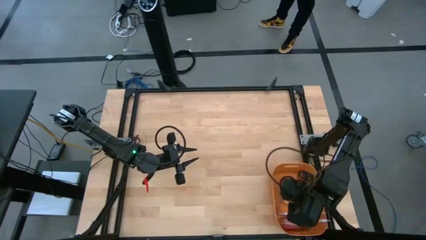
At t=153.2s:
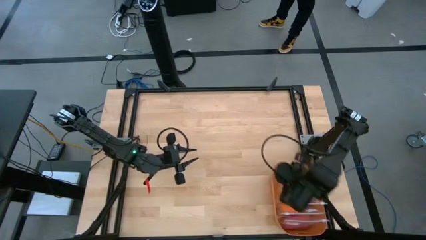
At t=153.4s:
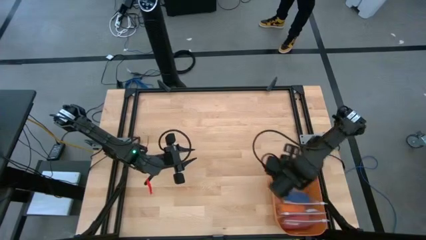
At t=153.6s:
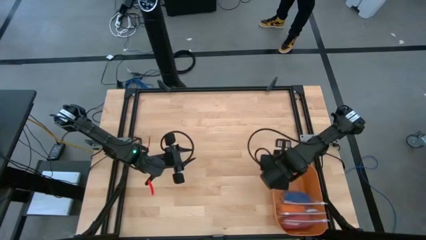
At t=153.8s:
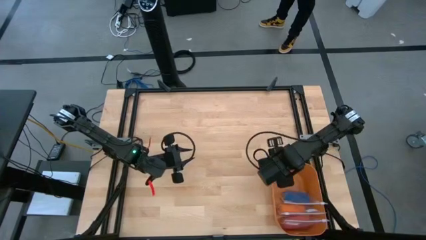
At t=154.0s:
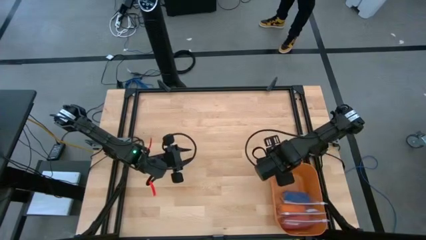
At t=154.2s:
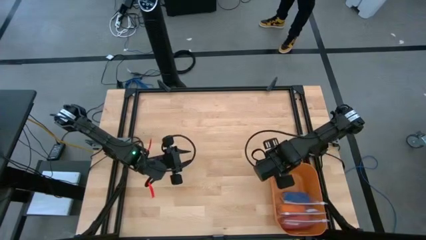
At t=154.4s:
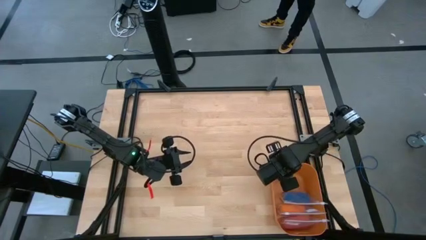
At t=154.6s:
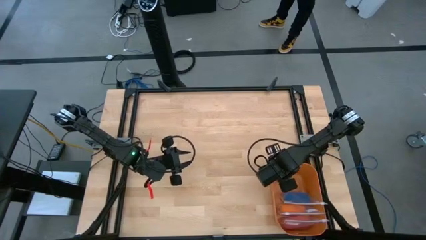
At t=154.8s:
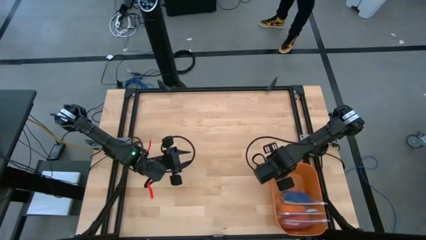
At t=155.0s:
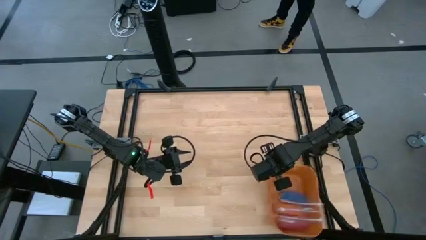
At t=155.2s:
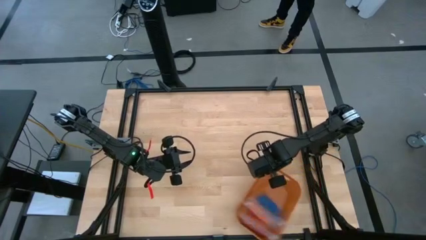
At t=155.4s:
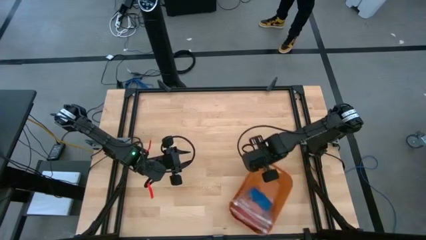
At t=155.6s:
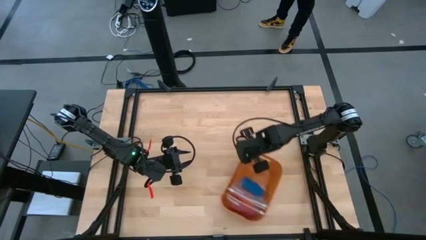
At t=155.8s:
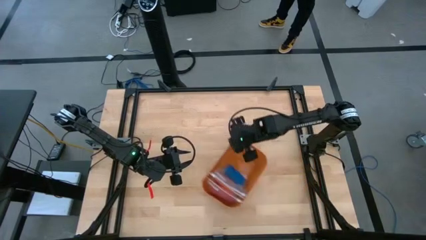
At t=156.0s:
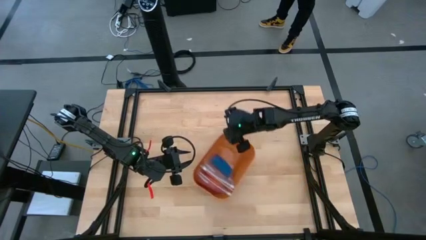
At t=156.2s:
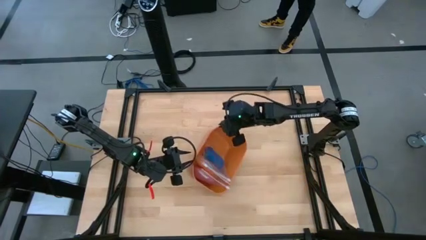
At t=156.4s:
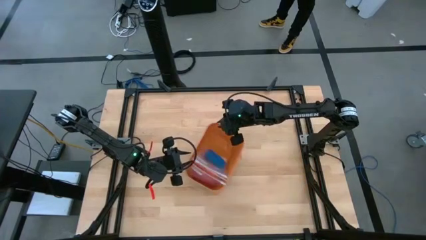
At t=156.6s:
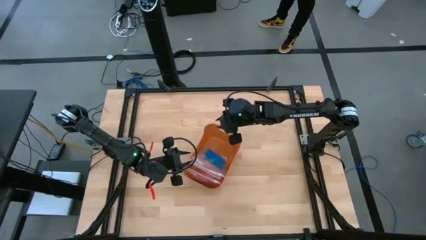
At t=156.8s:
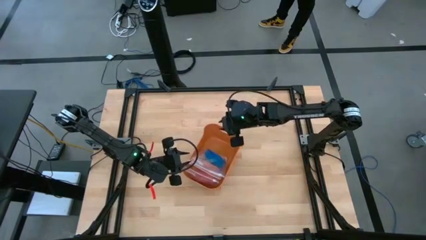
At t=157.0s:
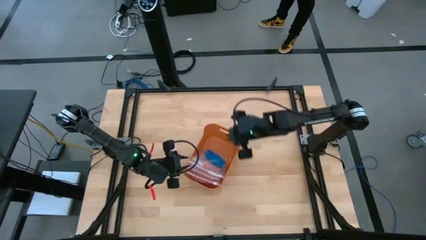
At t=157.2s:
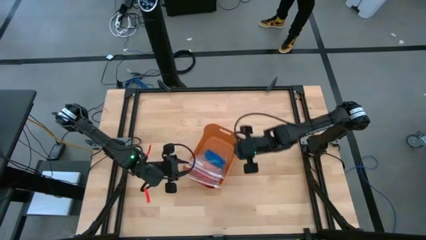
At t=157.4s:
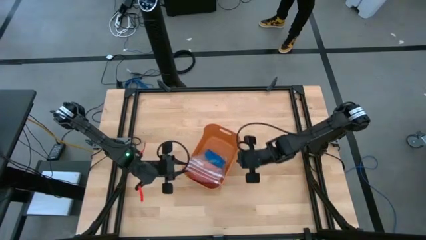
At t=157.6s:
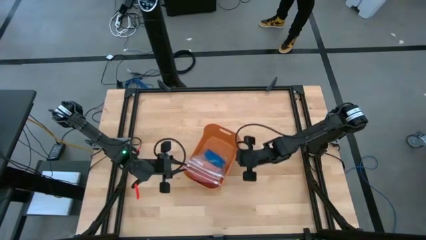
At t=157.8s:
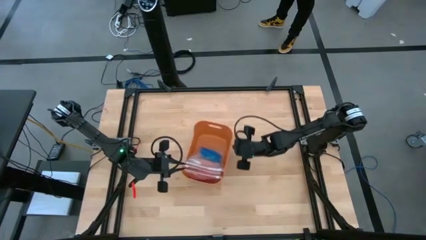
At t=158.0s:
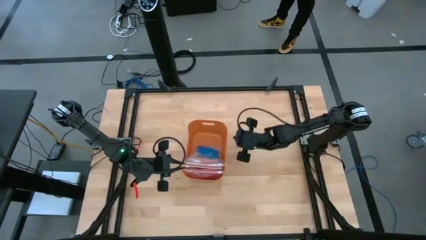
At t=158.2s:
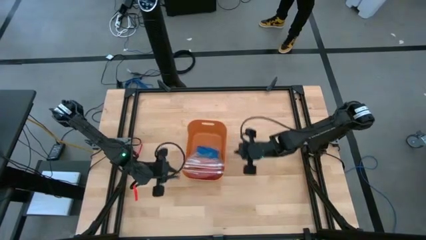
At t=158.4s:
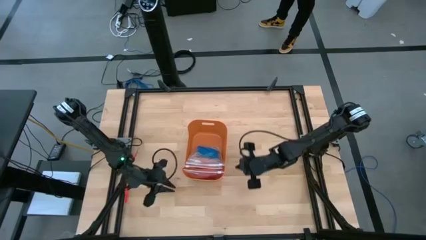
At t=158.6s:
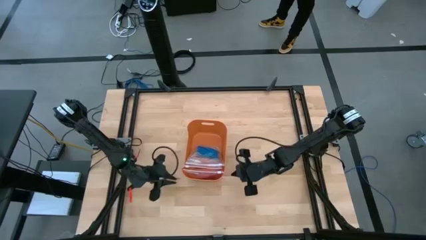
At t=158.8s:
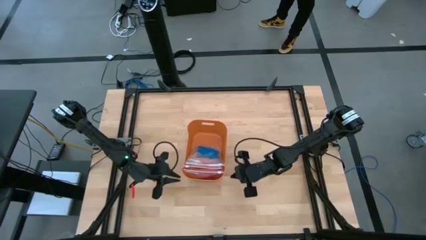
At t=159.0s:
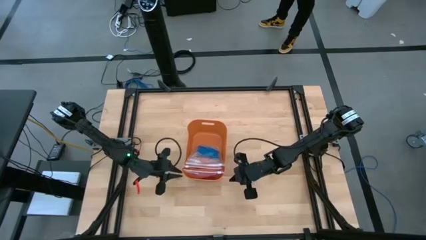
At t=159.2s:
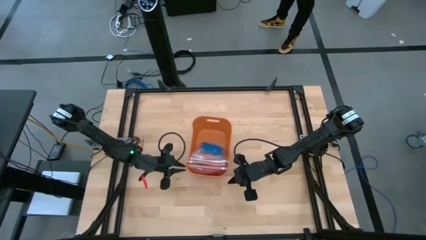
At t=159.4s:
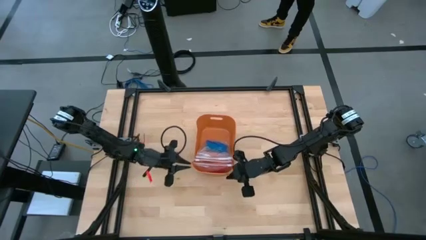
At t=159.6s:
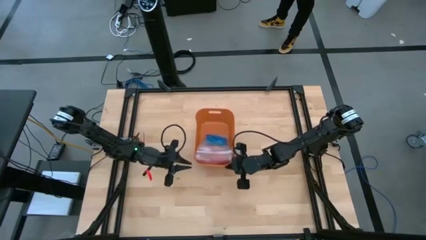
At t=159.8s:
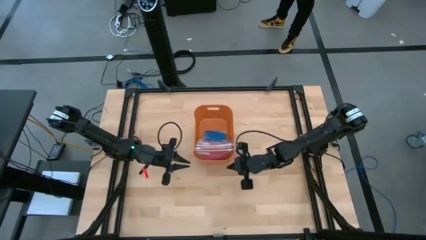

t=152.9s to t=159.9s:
Task: Roll bandage
Move the orange bin from the bottom right to the center of the table

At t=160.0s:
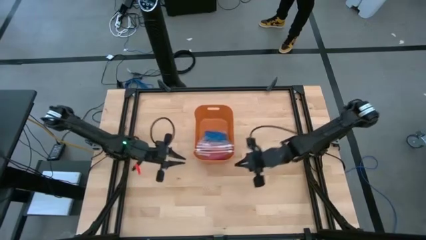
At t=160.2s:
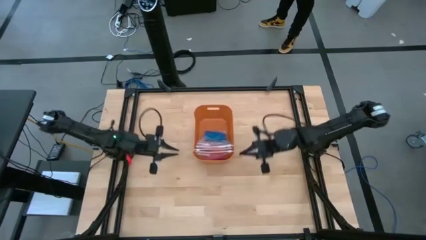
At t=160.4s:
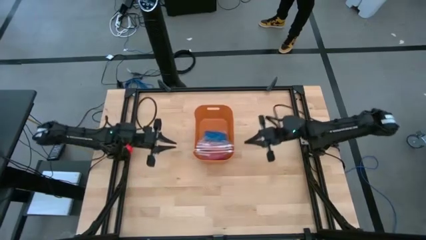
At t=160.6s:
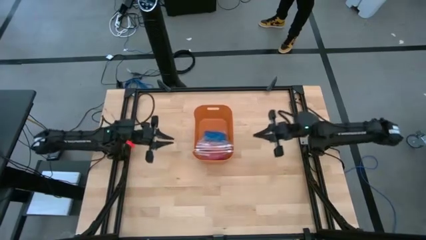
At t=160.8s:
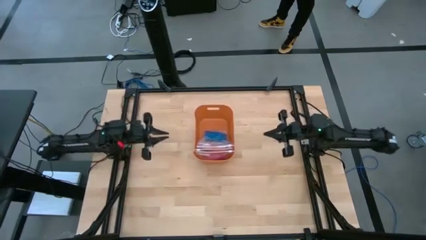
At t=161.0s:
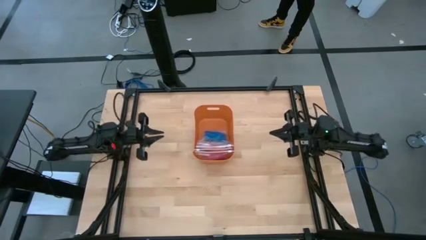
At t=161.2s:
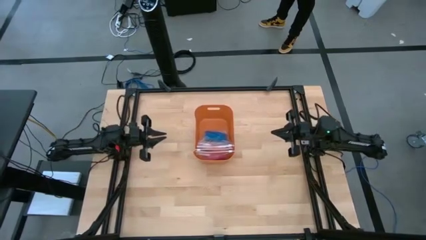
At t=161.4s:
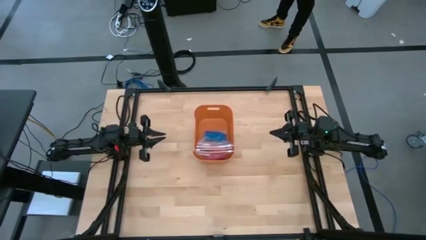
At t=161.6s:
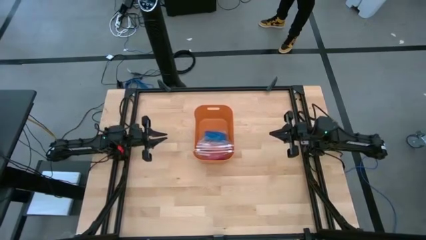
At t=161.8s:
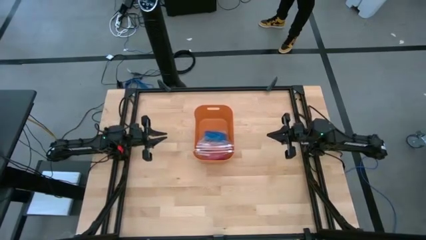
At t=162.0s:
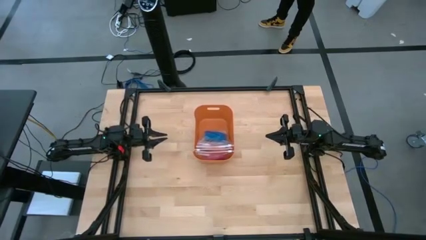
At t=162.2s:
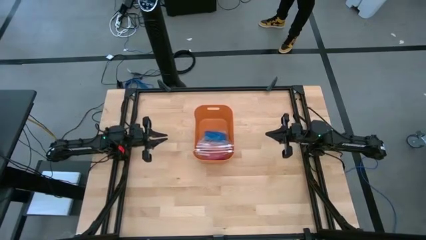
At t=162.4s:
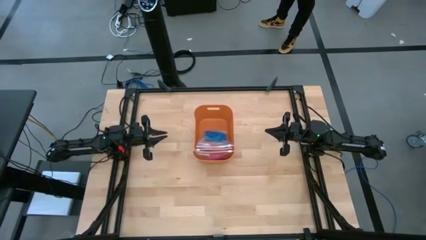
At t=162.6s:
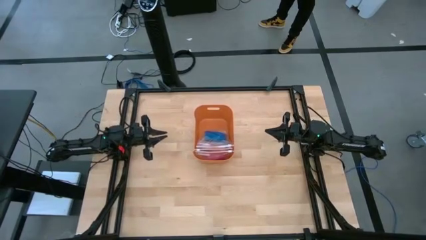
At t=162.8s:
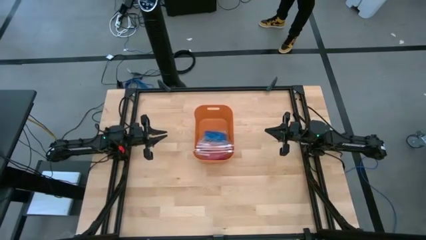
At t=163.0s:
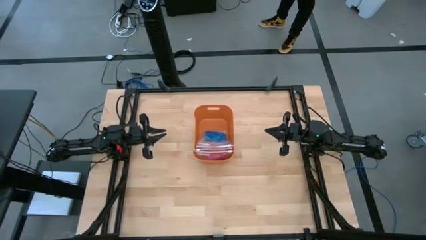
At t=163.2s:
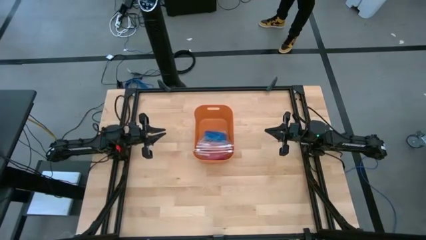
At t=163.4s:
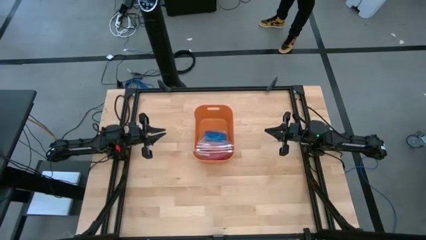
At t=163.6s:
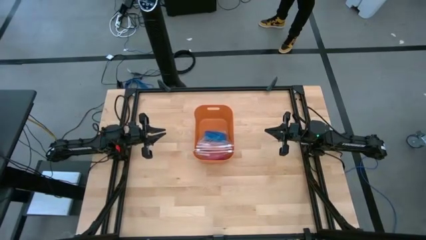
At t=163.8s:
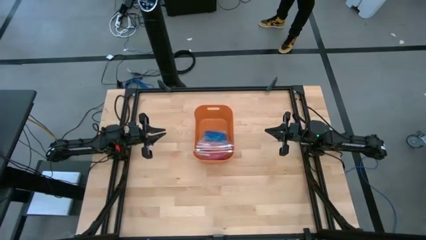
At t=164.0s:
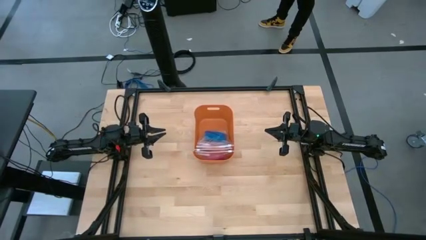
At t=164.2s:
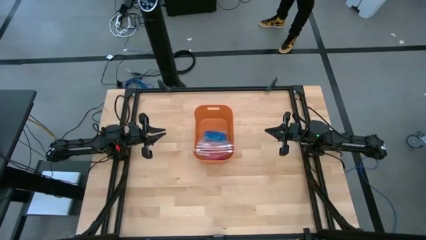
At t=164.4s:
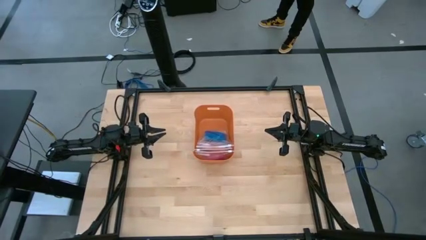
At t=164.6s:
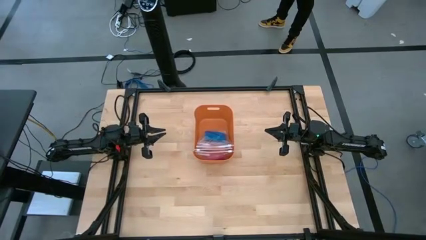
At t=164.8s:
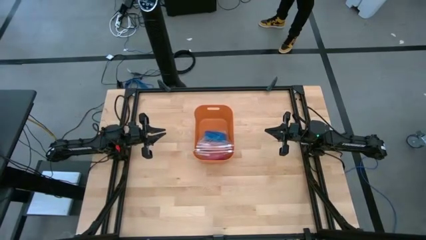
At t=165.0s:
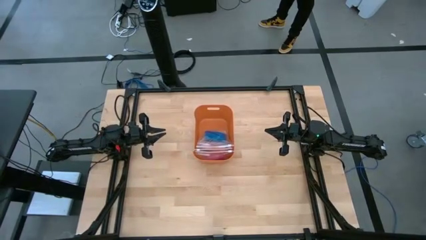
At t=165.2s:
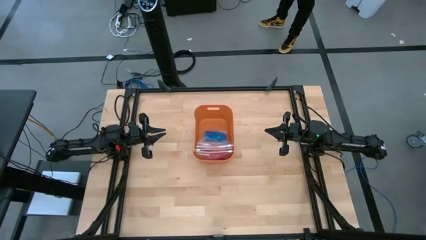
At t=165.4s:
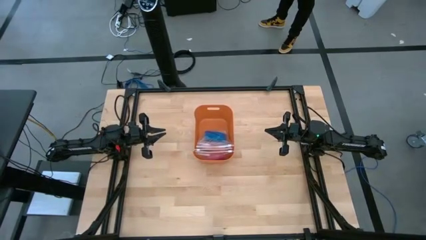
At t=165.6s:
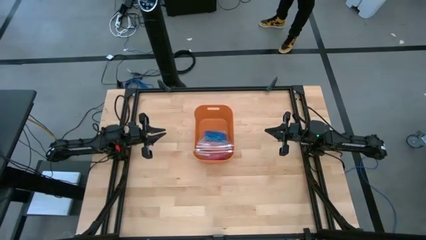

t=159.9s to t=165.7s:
Return to Home Position

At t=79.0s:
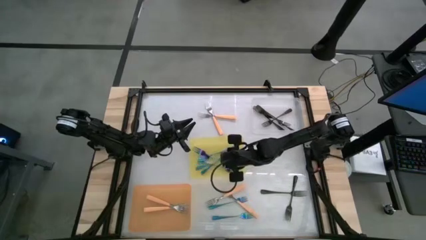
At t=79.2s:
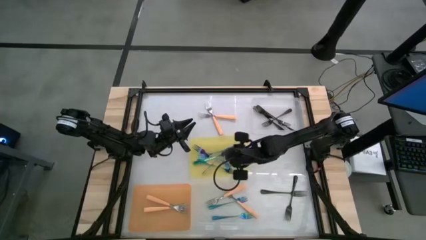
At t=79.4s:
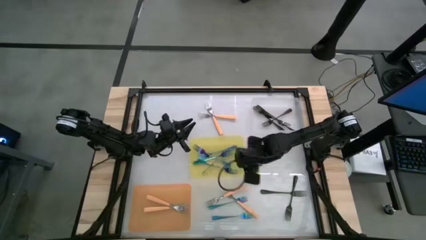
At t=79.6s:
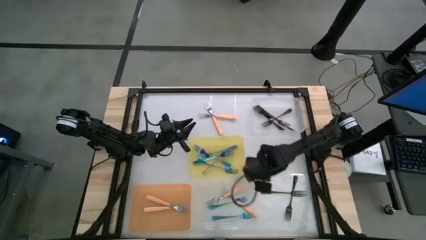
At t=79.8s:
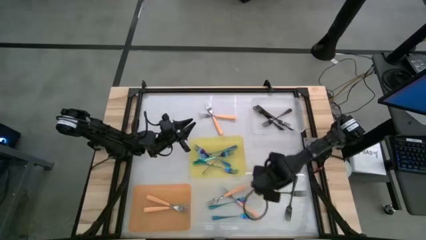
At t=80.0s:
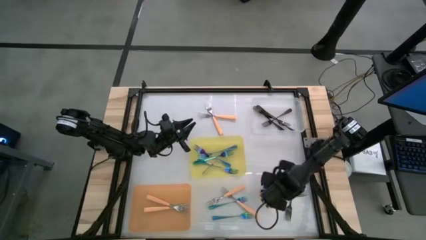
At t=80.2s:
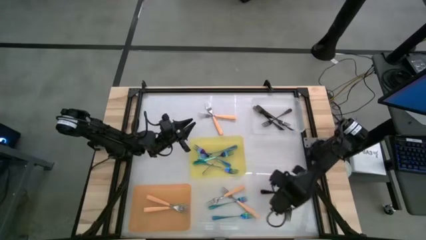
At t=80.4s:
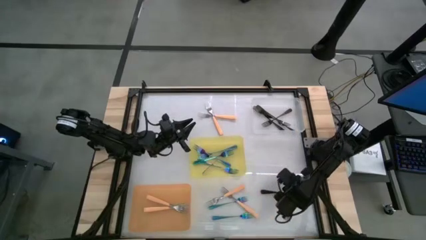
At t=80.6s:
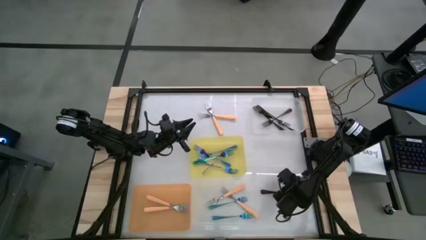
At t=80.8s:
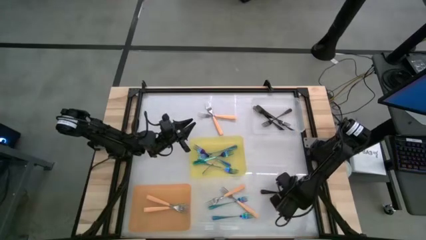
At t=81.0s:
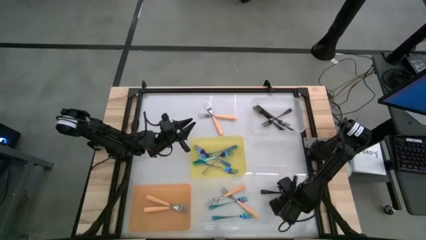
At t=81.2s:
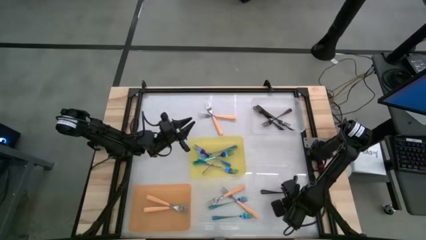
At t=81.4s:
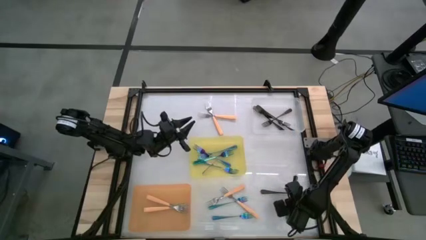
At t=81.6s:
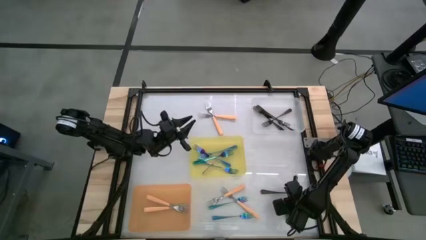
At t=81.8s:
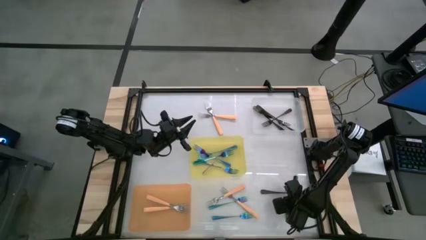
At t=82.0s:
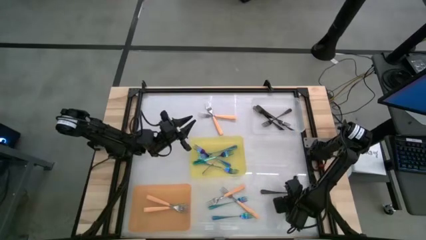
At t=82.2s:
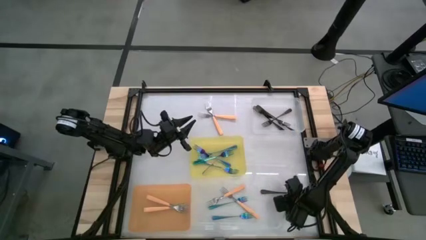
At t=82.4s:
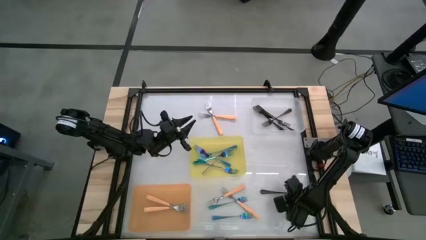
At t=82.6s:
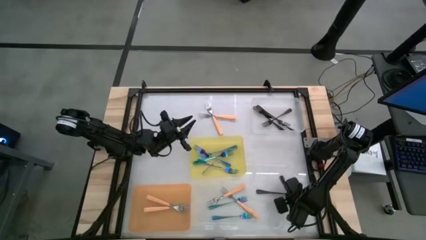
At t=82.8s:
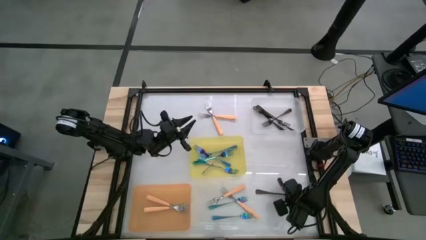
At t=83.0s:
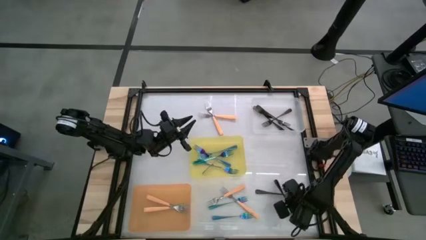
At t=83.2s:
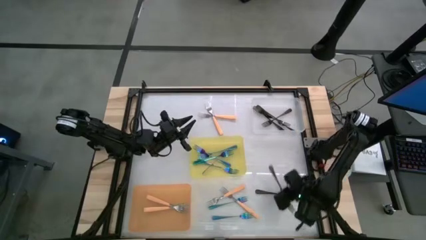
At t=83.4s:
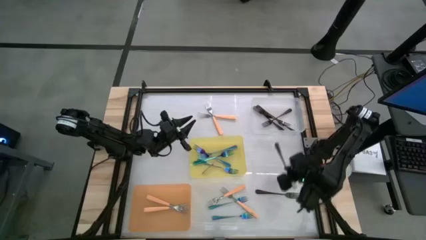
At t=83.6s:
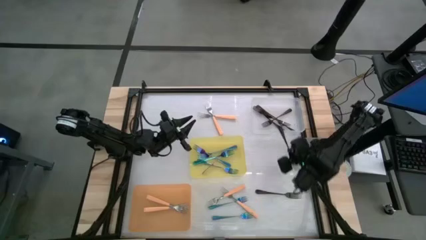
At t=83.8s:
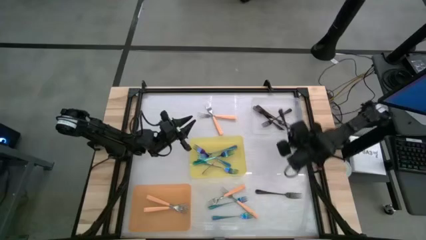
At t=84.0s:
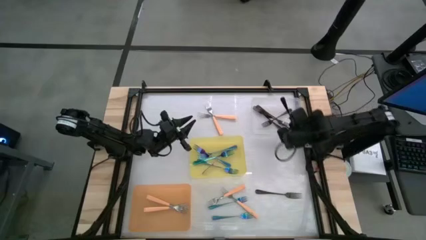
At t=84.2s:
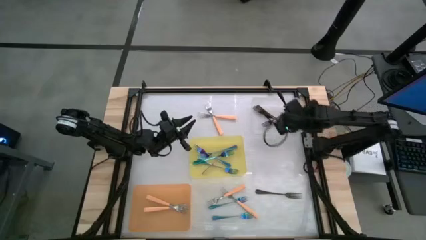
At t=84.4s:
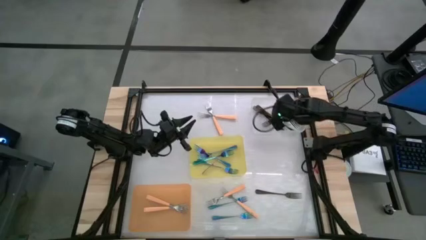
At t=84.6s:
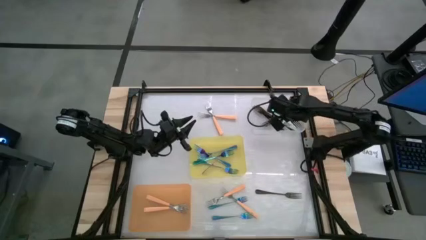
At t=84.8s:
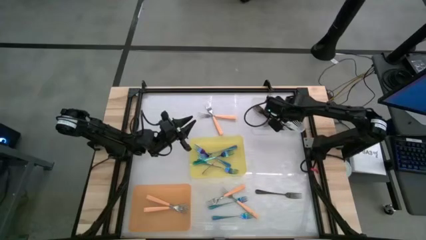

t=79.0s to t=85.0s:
Task: Sort silverware by color (type)
Put the black fork into the transparent bin
